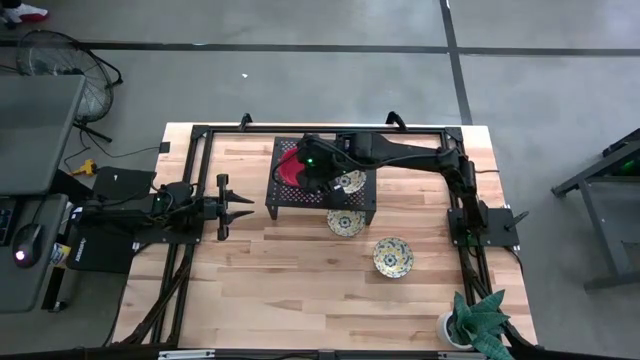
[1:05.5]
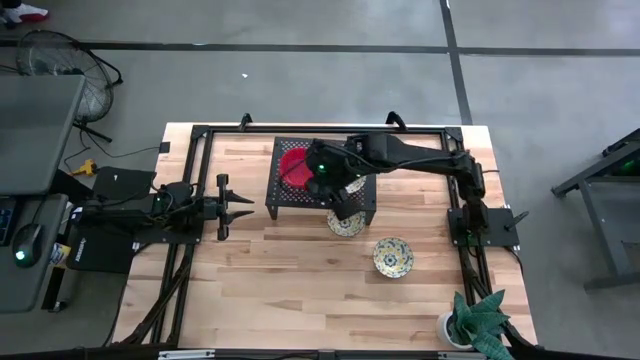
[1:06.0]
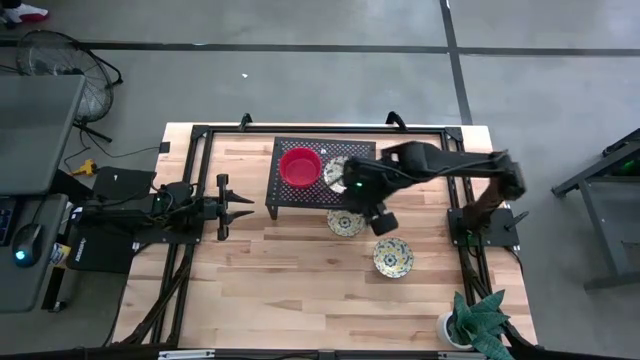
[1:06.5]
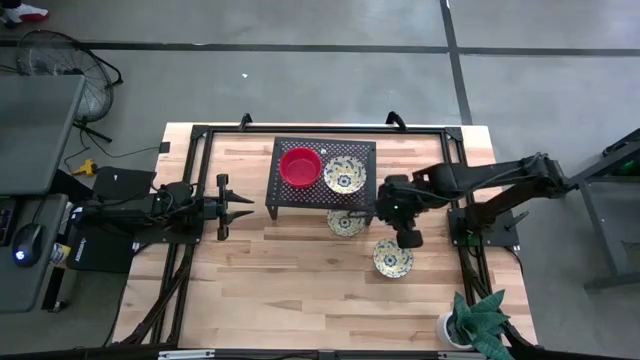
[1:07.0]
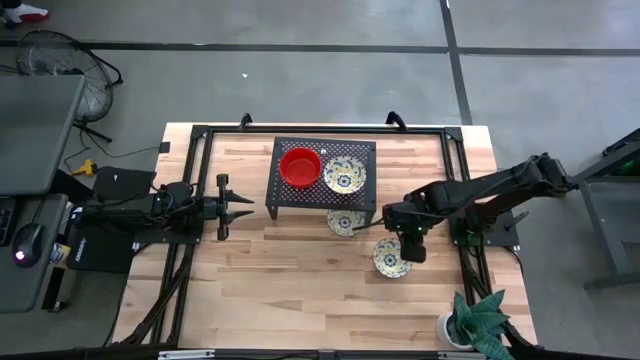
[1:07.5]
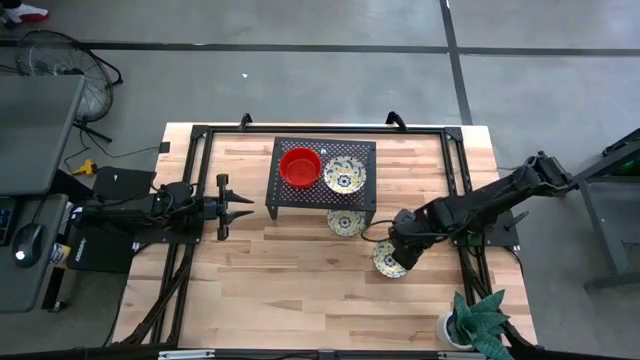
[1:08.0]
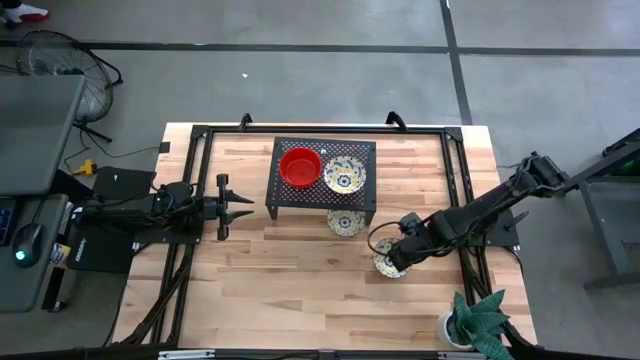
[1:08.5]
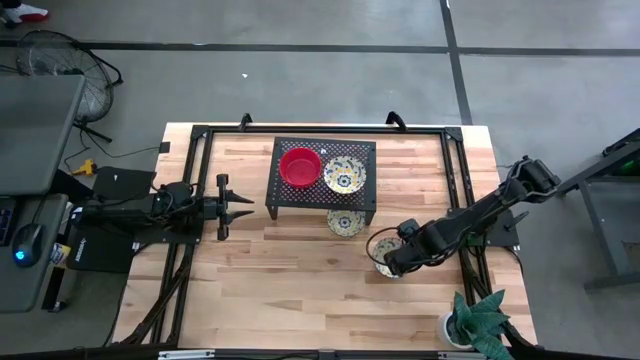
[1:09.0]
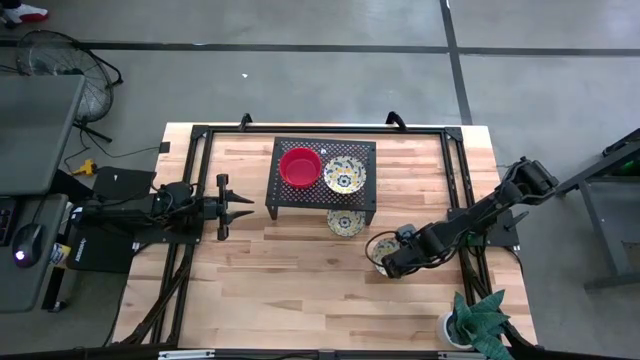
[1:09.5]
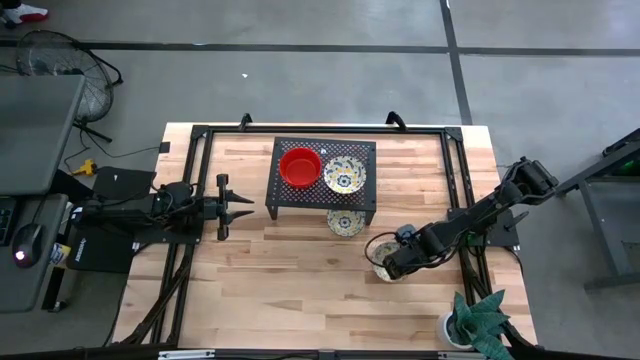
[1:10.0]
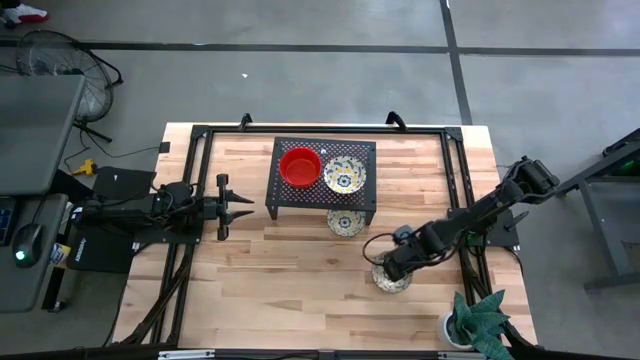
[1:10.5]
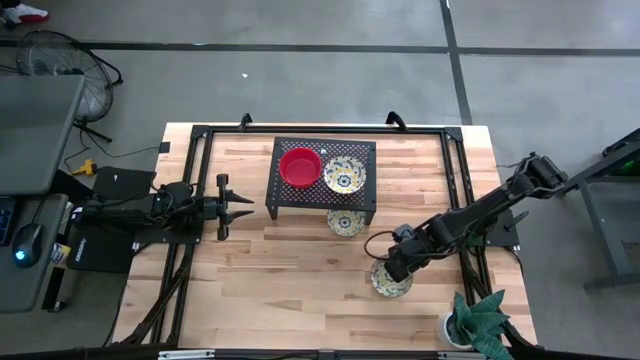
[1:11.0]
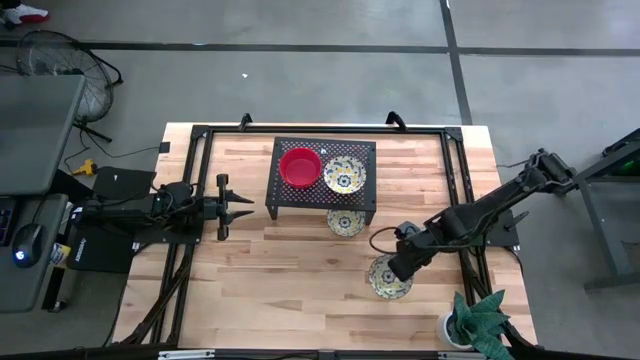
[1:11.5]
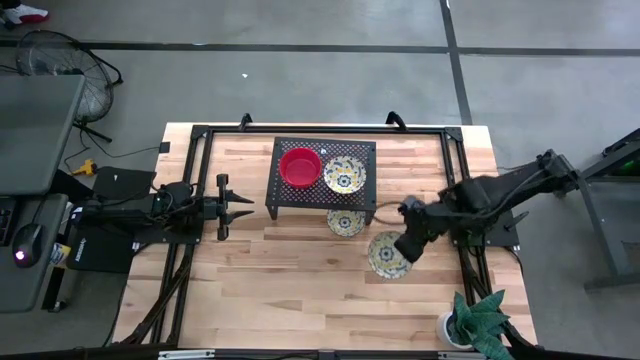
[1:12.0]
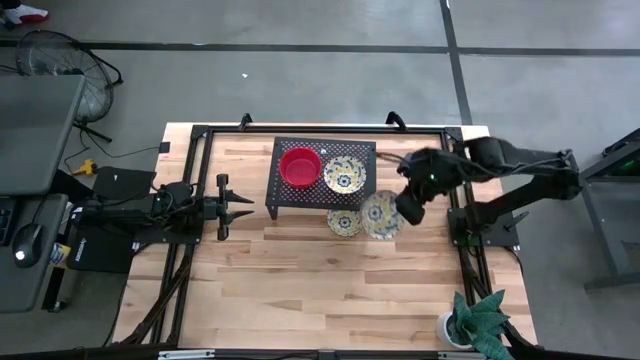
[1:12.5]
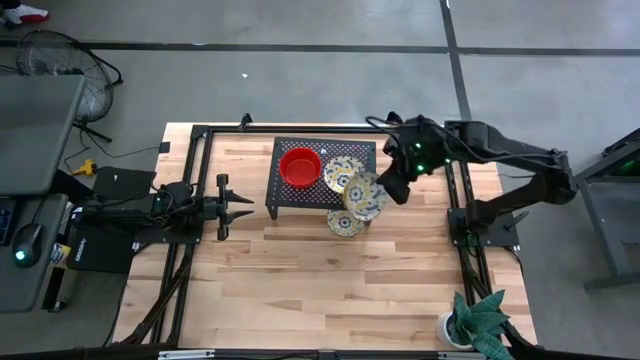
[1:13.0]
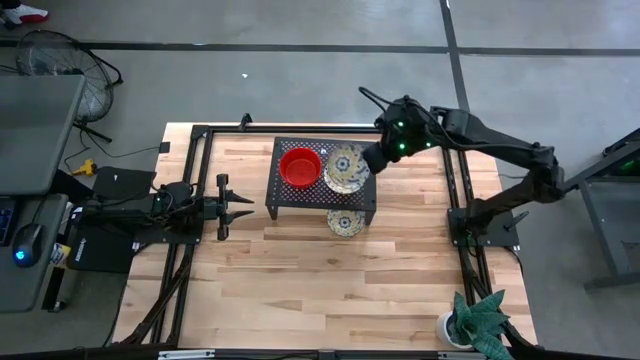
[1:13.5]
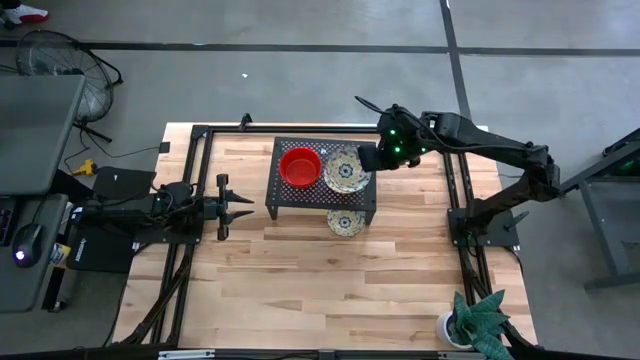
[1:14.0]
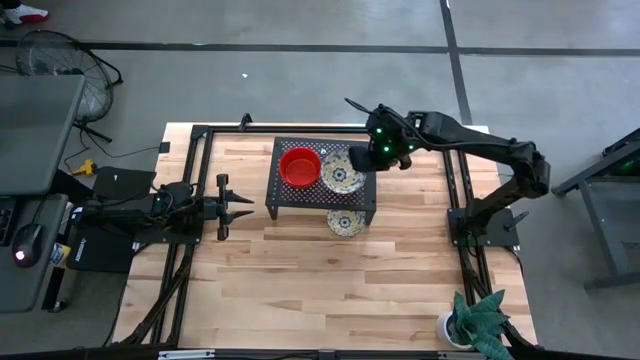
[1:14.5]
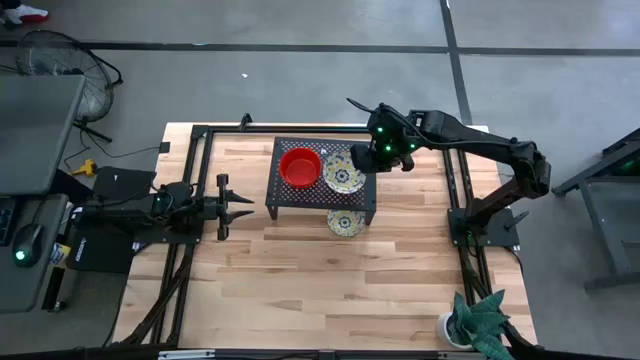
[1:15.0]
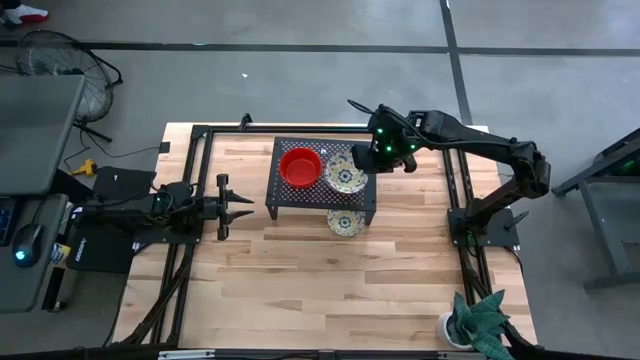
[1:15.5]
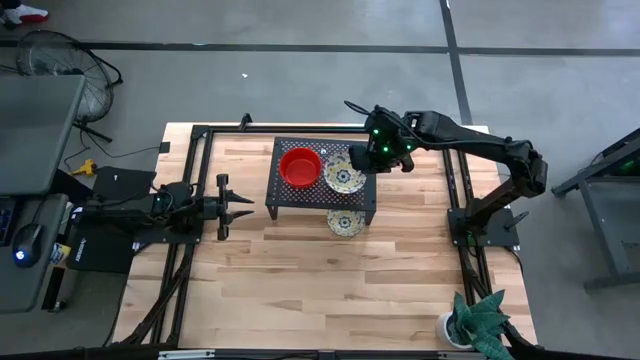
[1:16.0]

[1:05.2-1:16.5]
Task: Pick & Place Mini bowls
Stack the bottom white patterned bowl on the white patterned bowl on the shelf

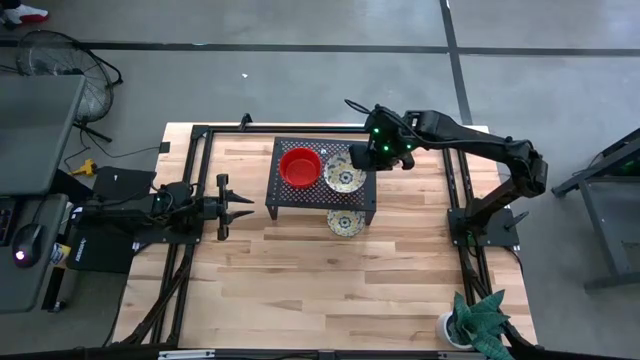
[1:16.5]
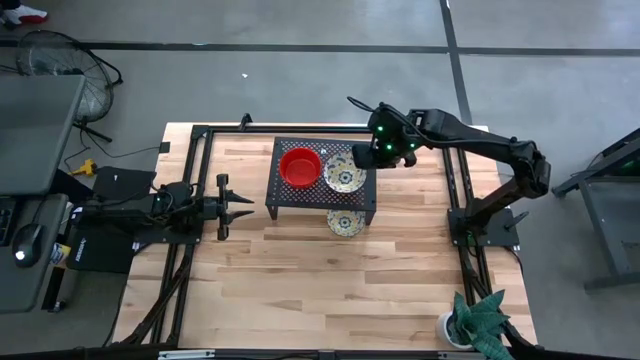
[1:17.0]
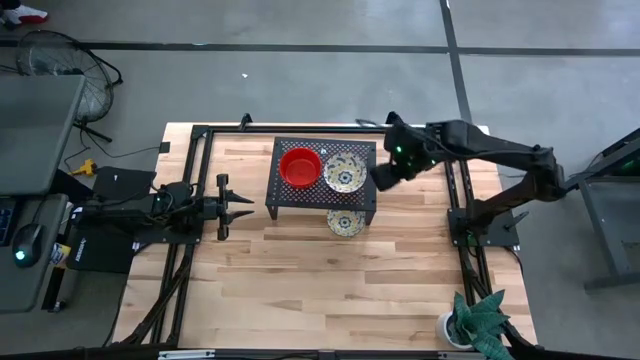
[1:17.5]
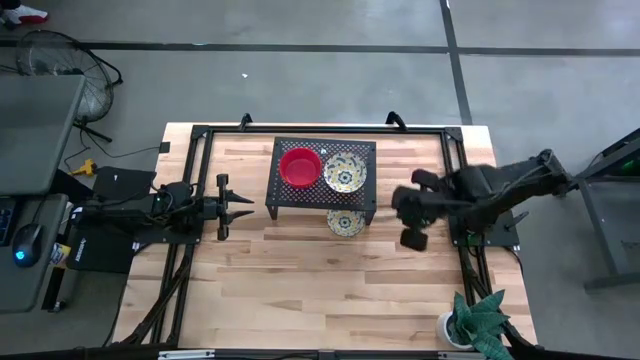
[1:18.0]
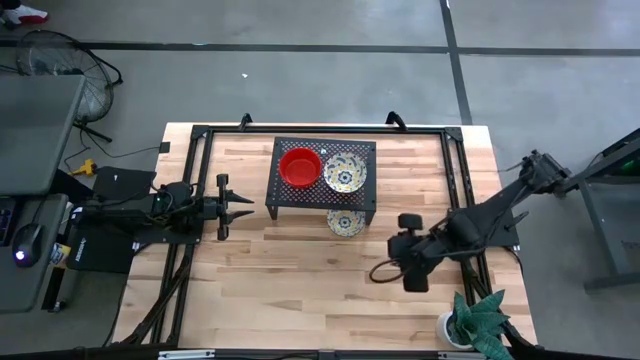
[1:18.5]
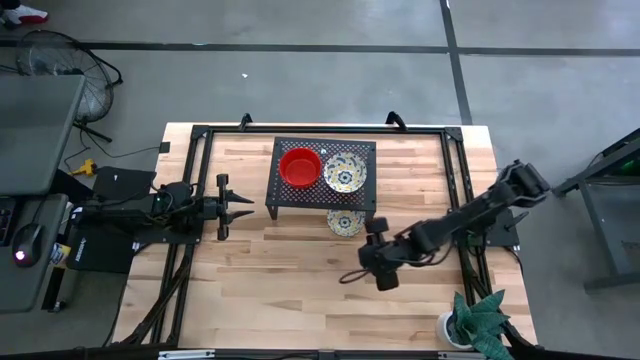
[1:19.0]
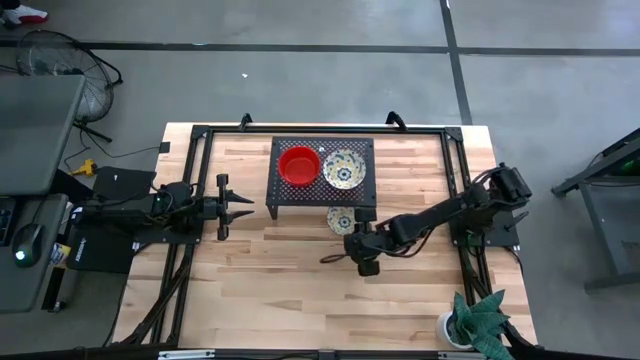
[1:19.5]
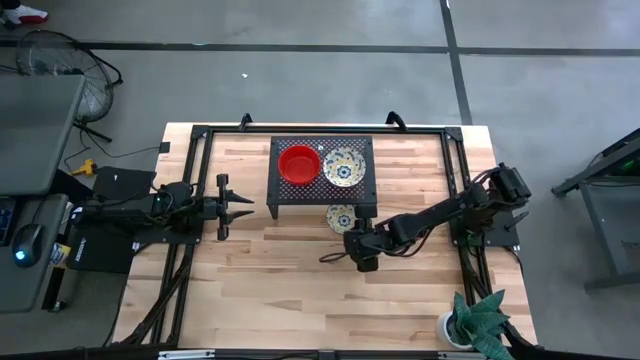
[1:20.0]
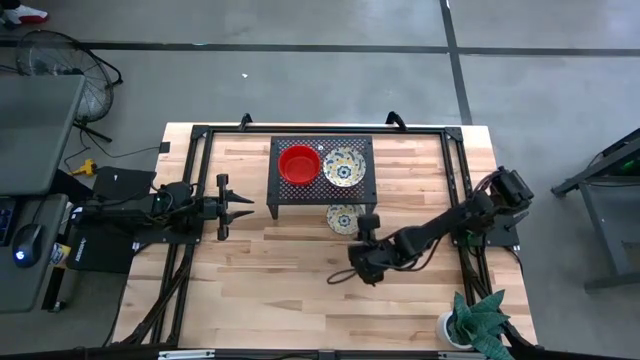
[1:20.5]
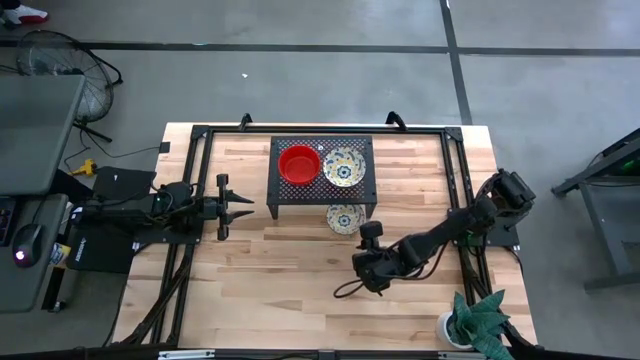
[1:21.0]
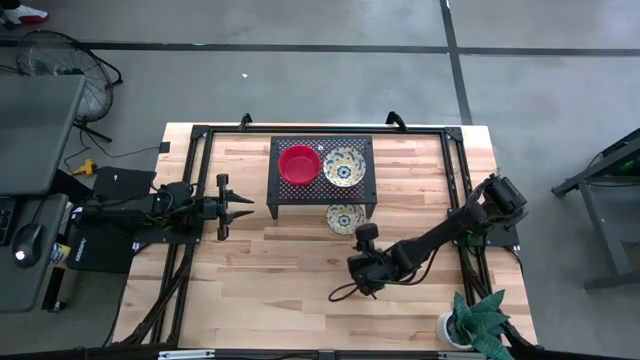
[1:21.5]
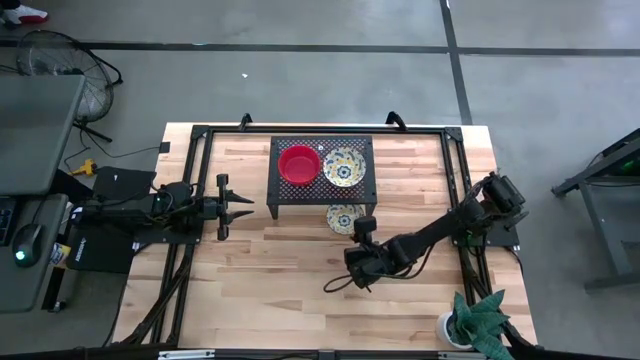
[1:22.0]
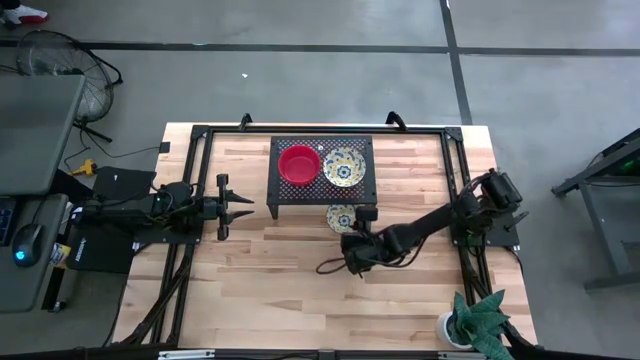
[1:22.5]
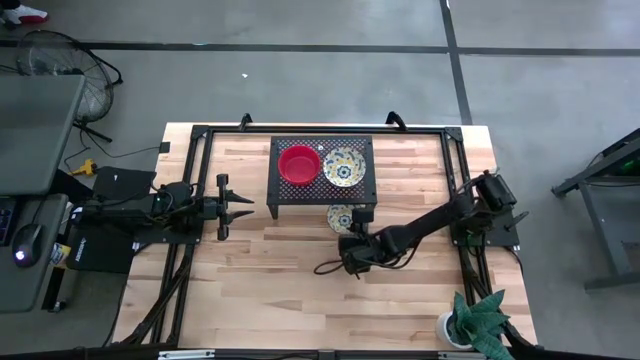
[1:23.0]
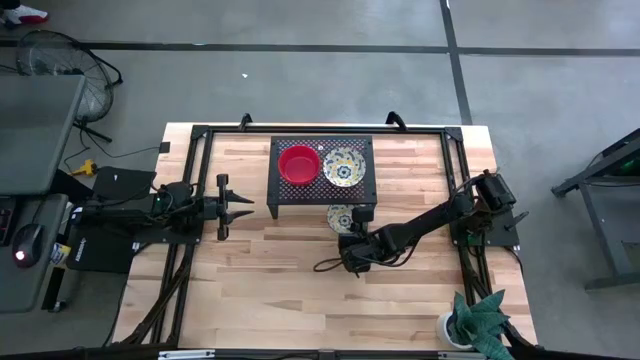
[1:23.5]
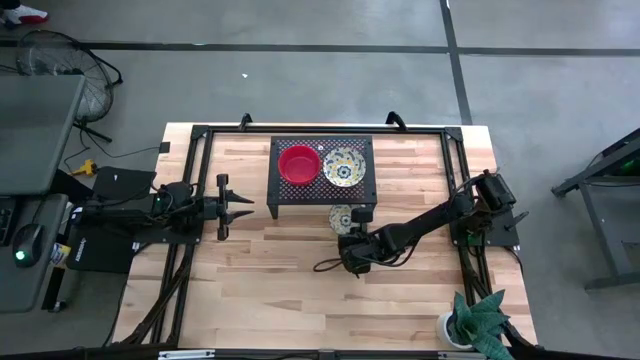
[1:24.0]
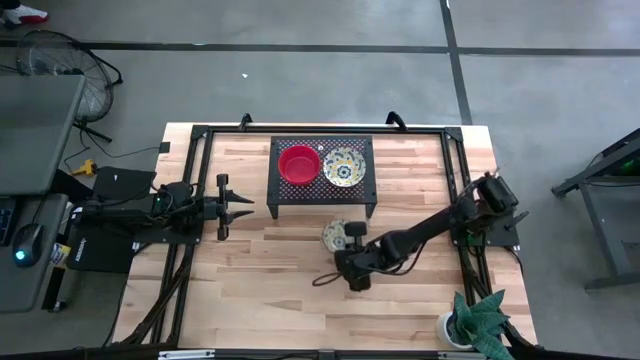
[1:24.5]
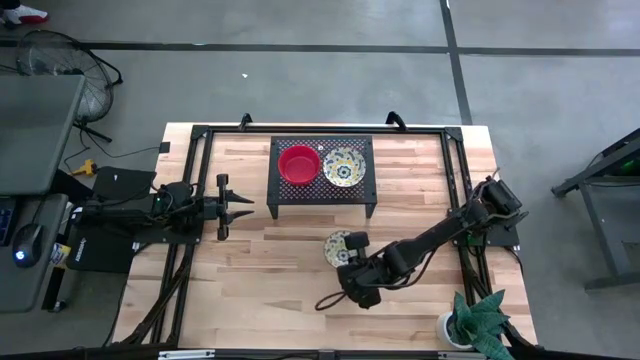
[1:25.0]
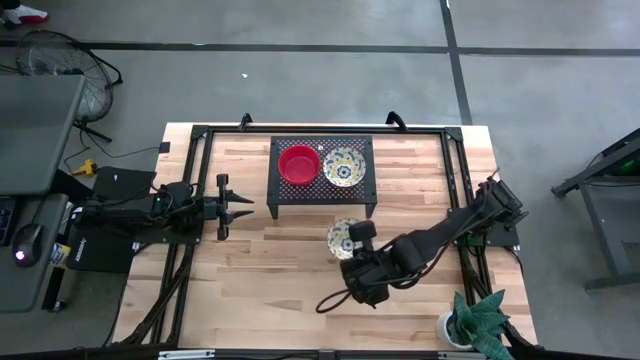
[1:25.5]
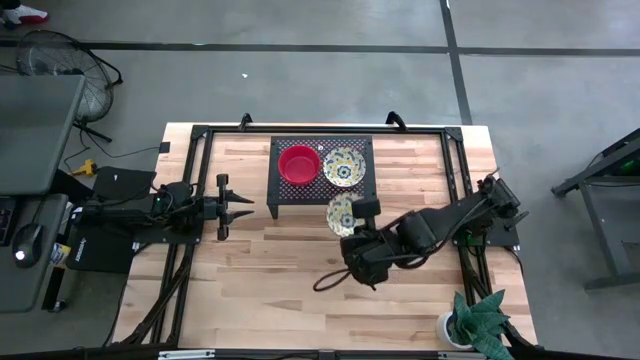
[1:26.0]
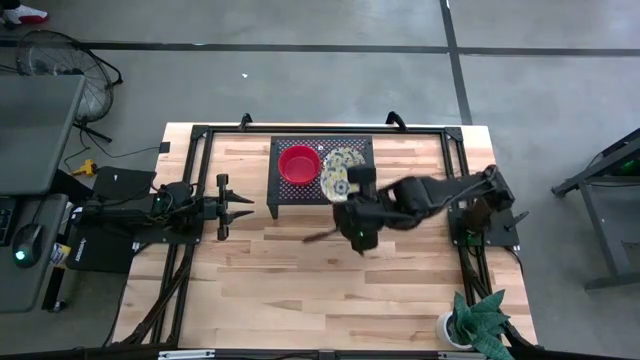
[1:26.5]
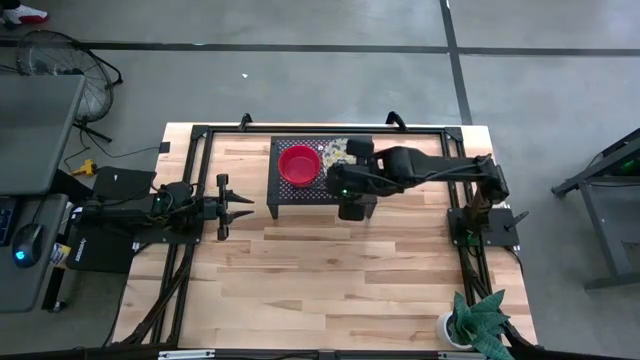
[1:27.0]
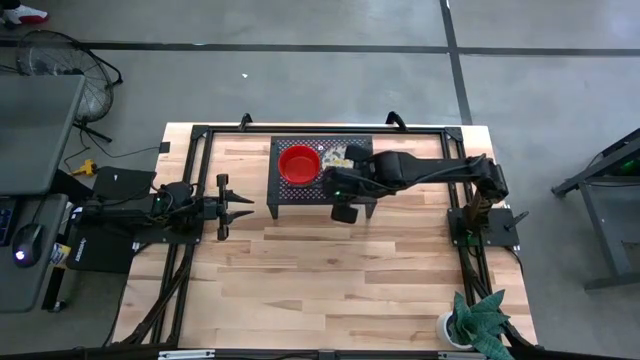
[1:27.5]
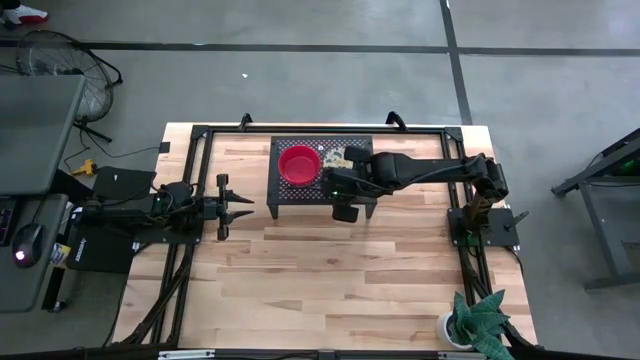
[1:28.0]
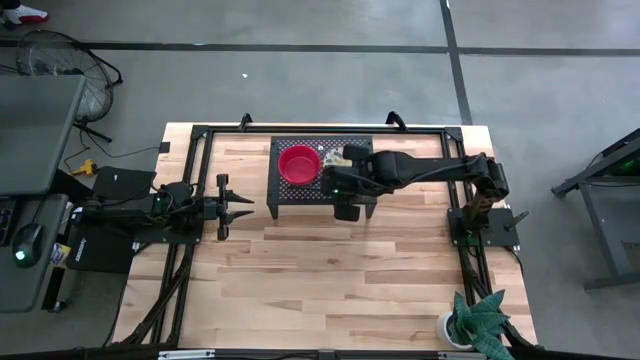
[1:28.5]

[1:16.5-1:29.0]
Stack the white patterned bowl on the white patterned bowls on the shelf
